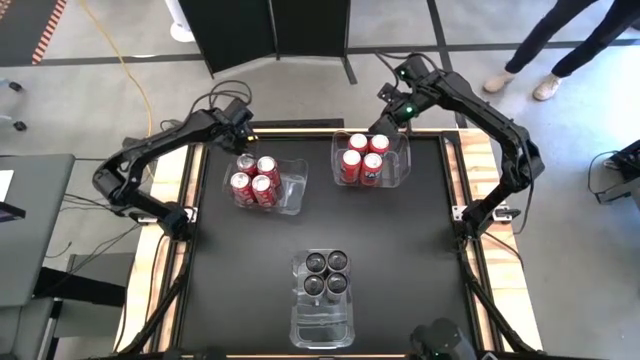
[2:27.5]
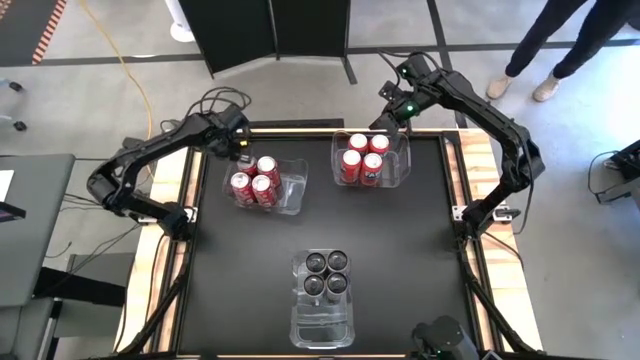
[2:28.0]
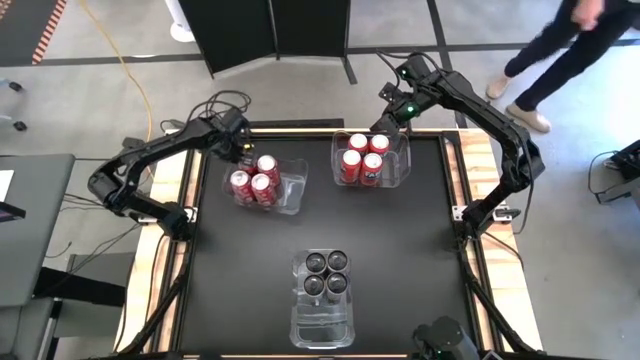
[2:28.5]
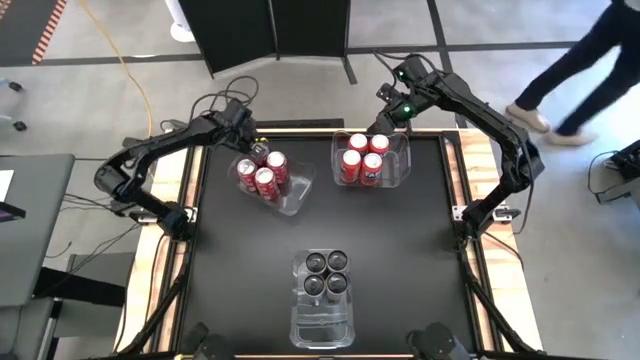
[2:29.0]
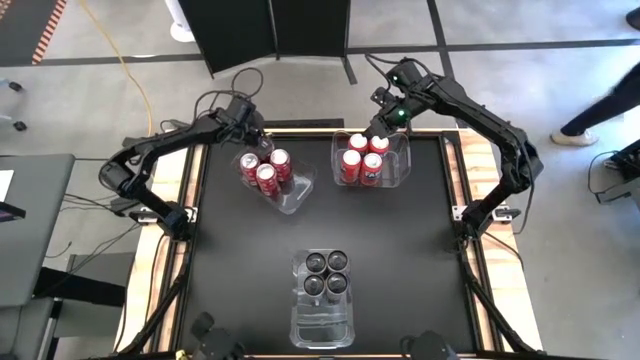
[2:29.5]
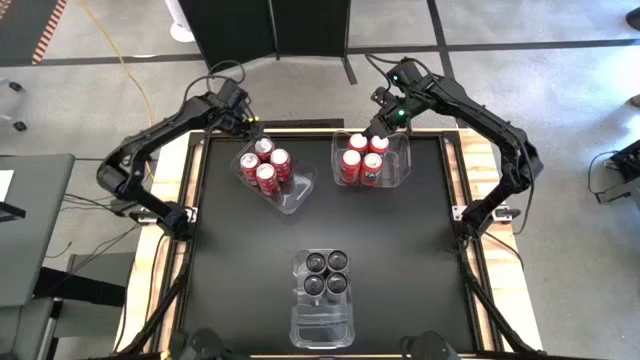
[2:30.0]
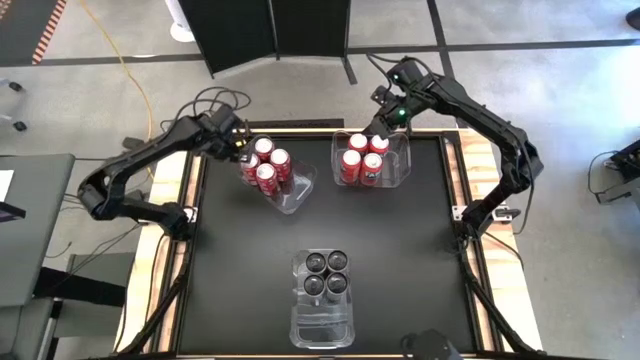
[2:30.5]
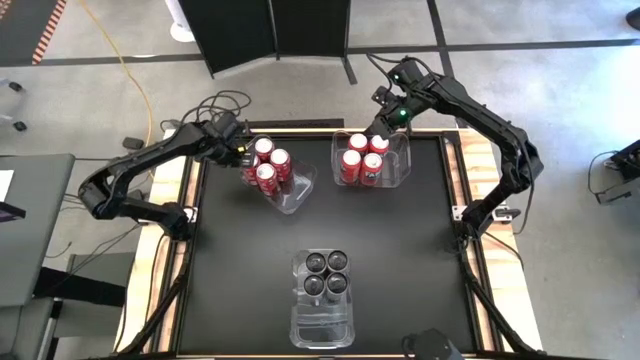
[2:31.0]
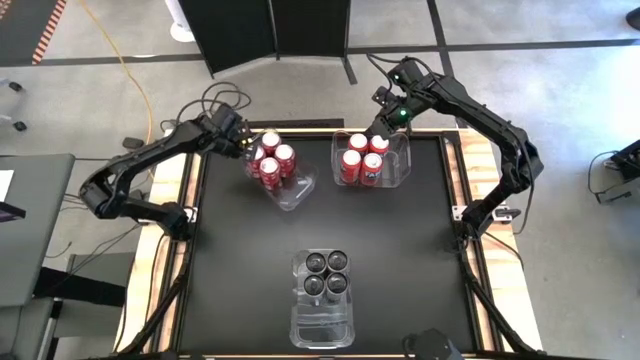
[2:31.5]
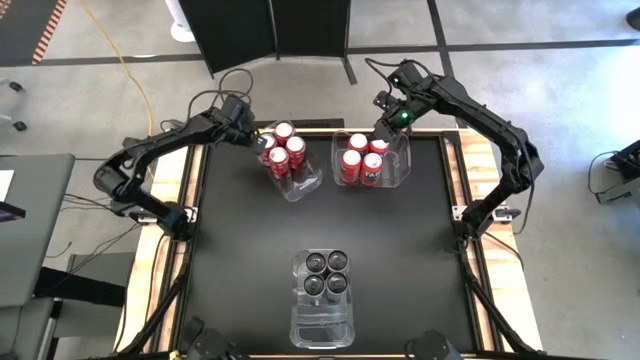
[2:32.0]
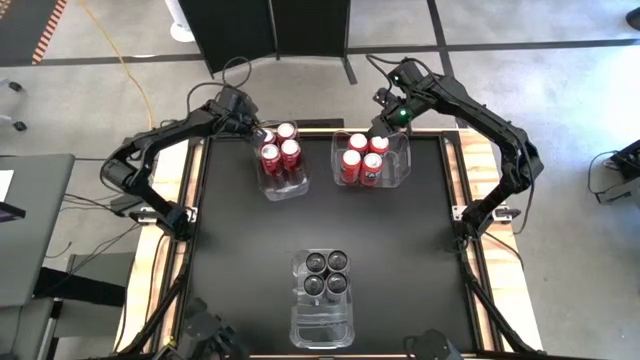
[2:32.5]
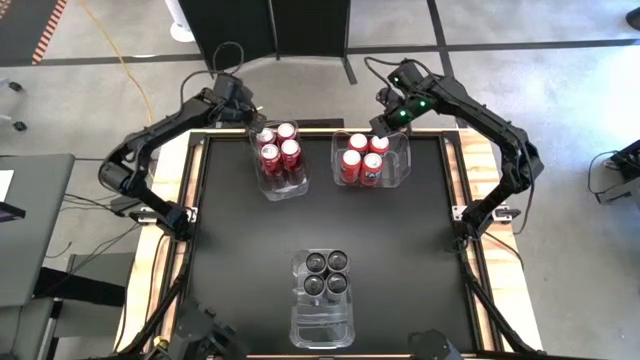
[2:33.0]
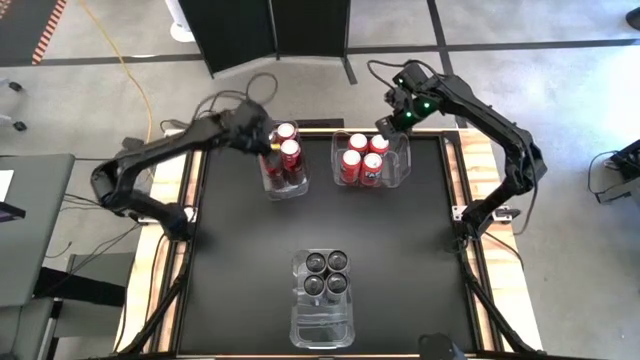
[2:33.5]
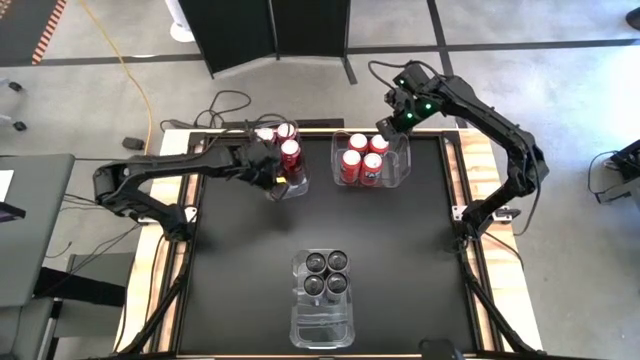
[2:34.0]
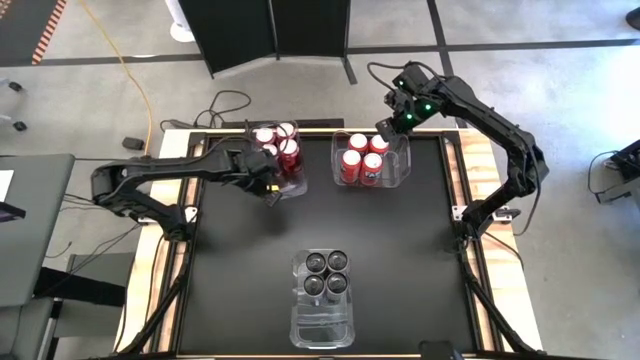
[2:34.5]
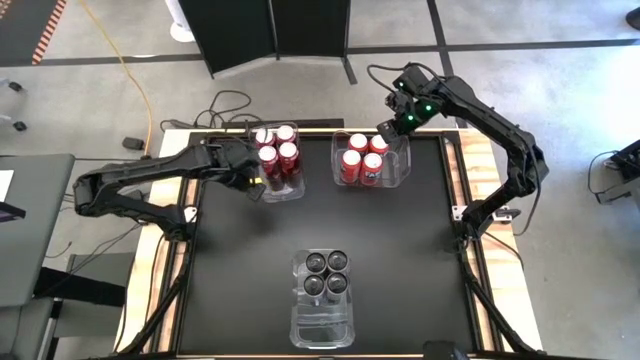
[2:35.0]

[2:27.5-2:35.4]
Task: Sort soda cans
Adjust the left transparent bin

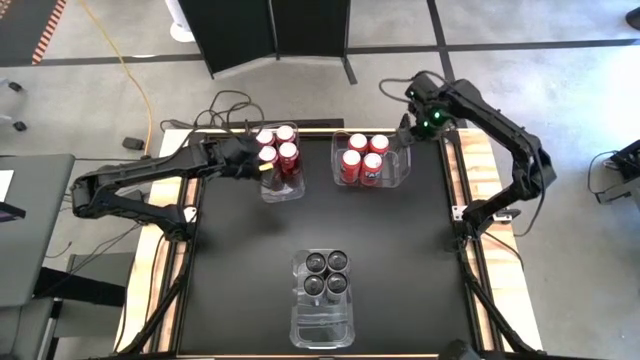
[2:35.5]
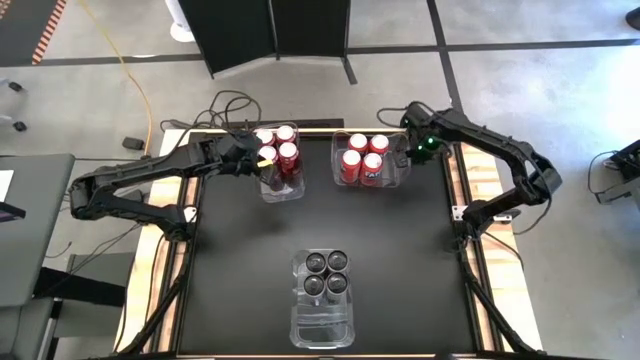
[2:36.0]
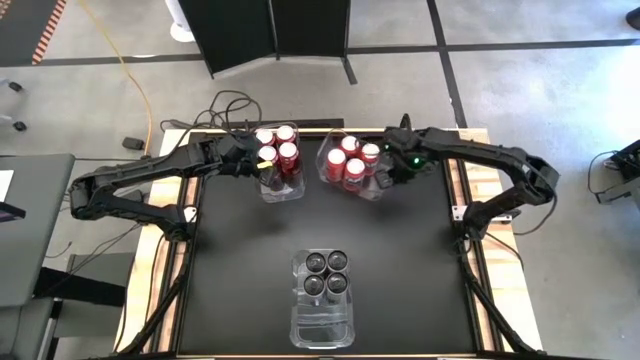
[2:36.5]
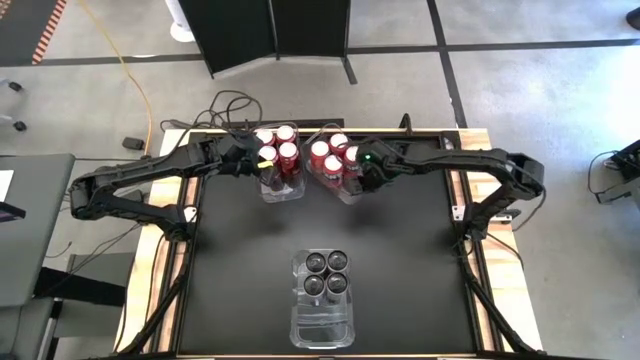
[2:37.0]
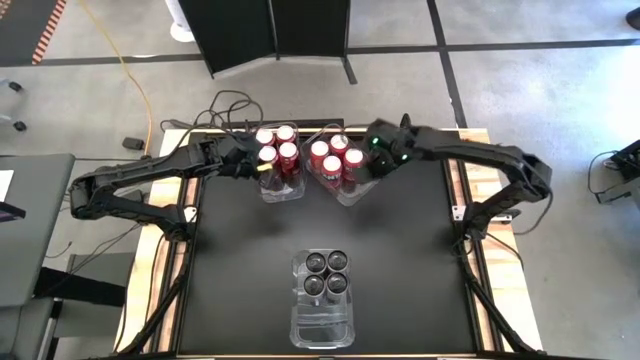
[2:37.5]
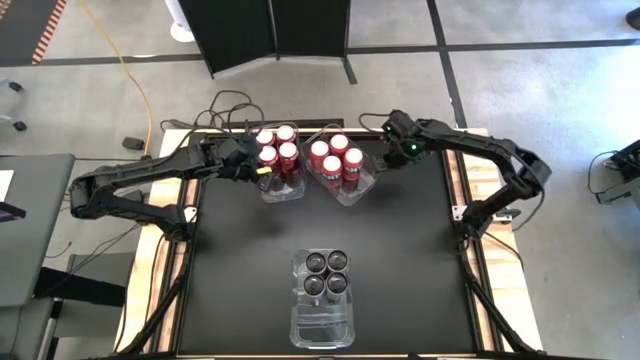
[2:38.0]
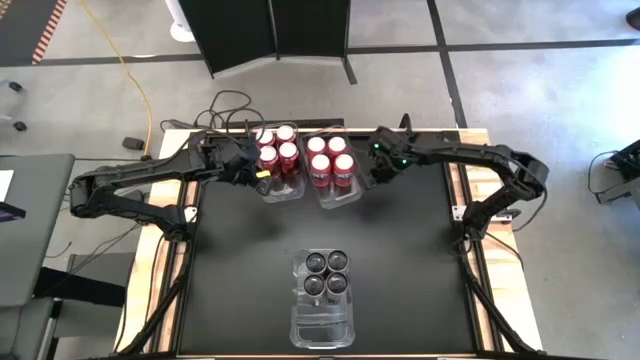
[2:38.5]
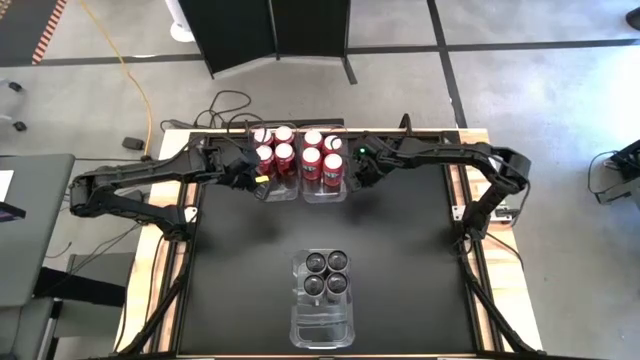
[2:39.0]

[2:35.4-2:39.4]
Adjust the right transparent bin

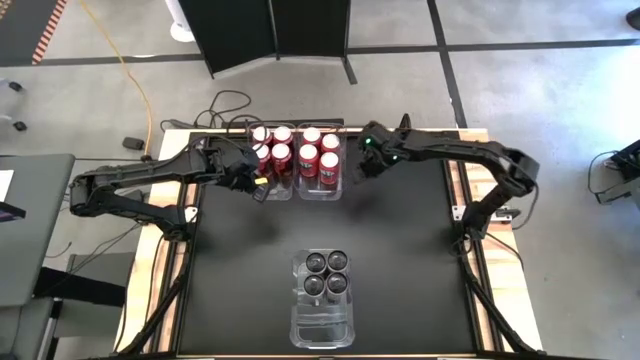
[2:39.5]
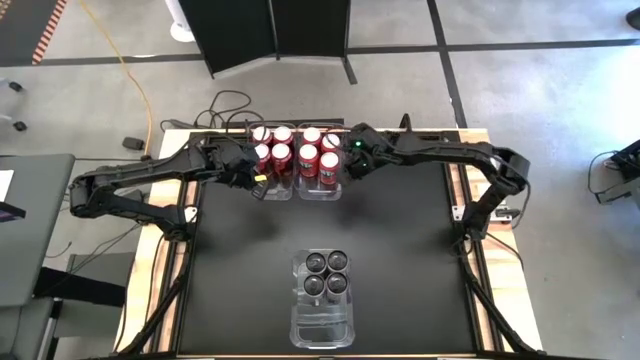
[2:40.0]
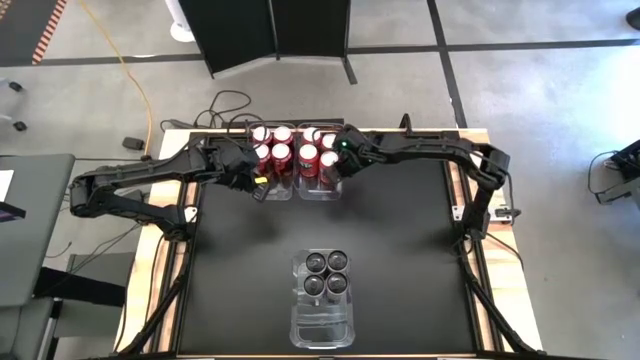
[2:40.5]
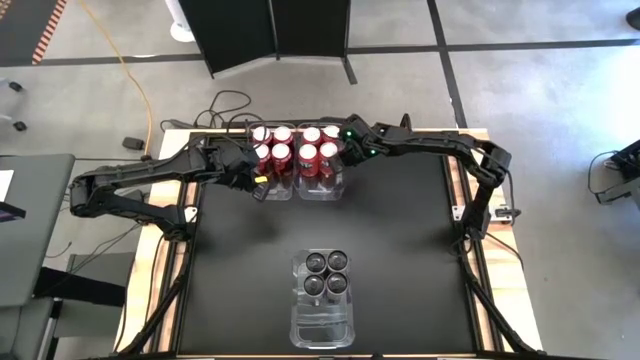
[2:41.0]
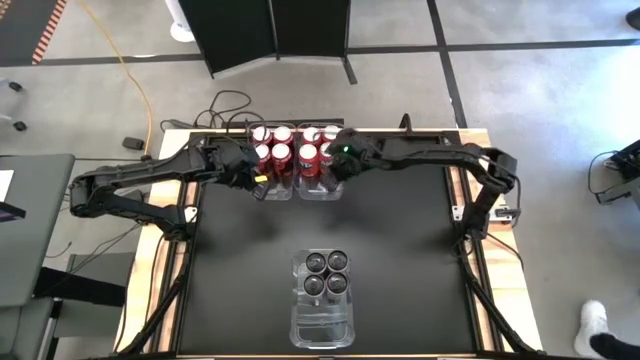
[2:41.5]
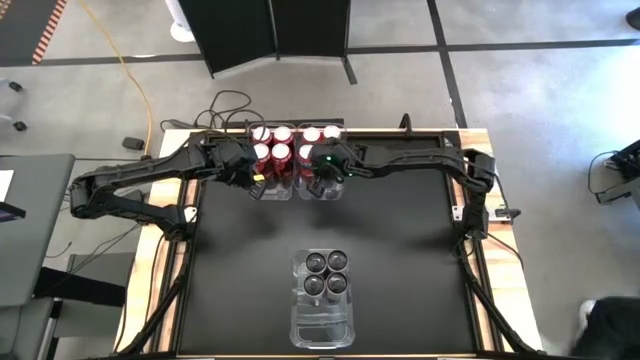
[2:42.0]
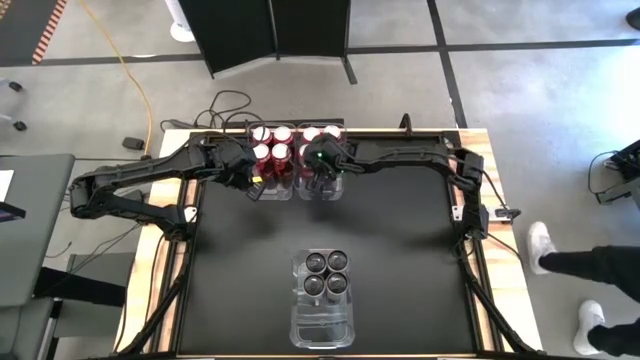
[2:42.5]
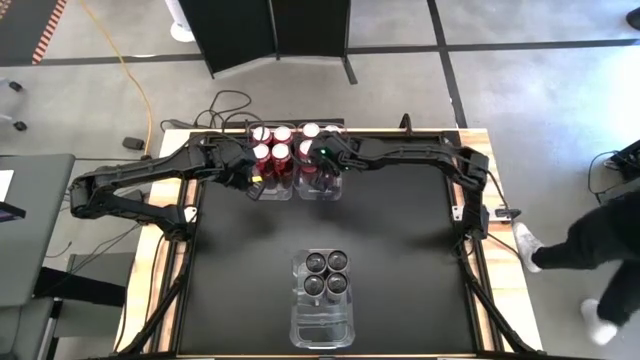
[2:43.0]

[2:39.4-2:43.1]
Adjust the orange soda can on the right transparent bin

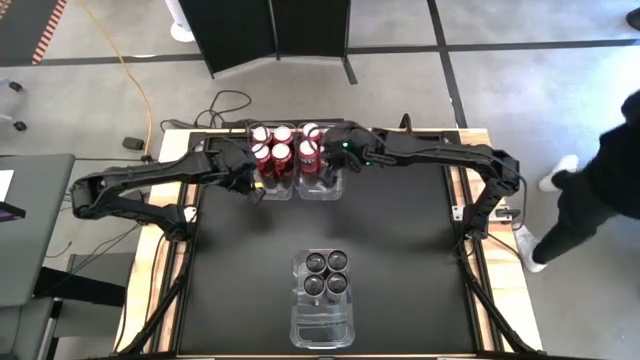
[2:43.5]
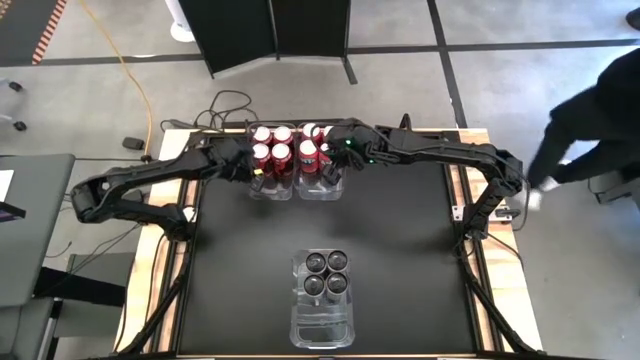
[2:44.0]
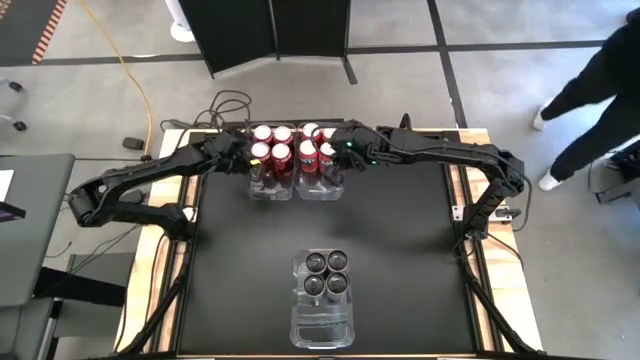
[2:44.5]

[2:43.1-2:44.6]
Adjust the red soda can on the left transparent bin

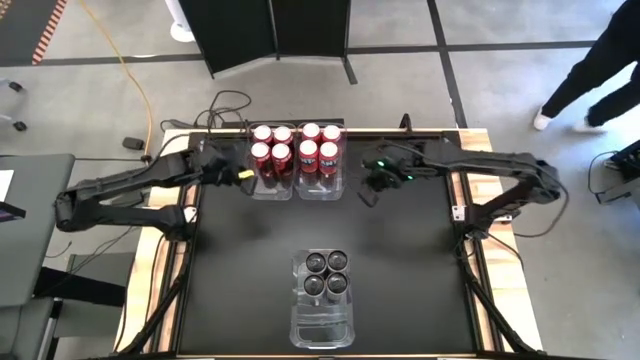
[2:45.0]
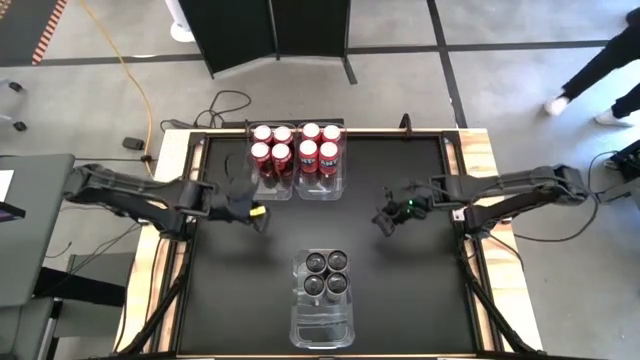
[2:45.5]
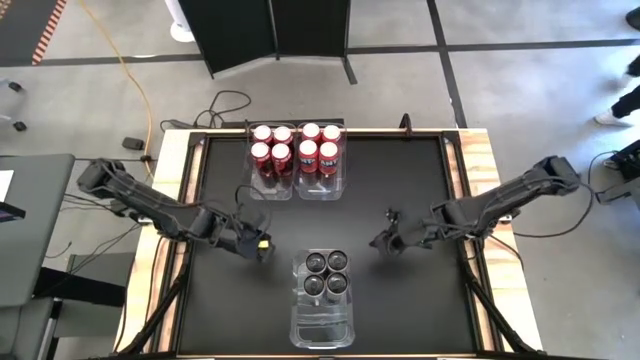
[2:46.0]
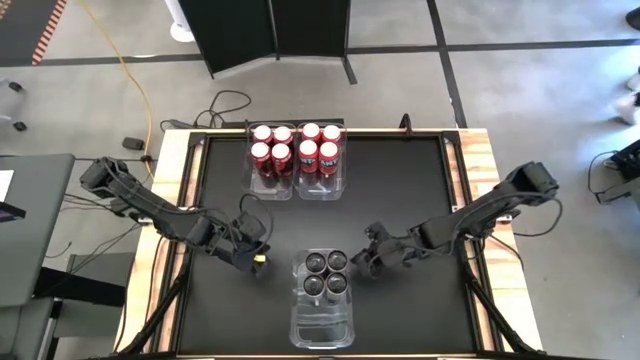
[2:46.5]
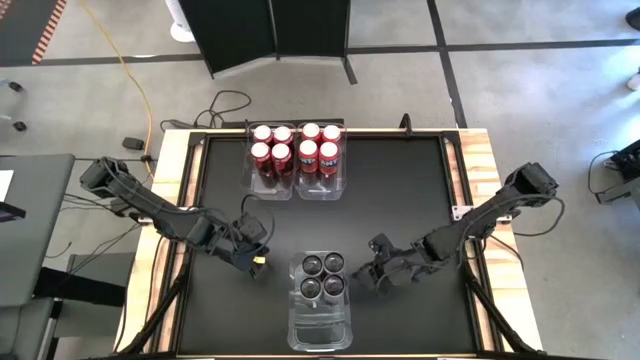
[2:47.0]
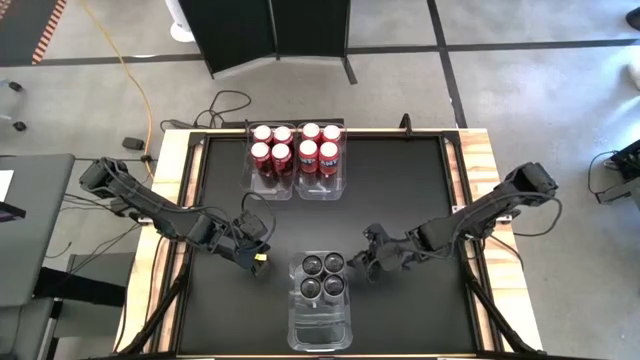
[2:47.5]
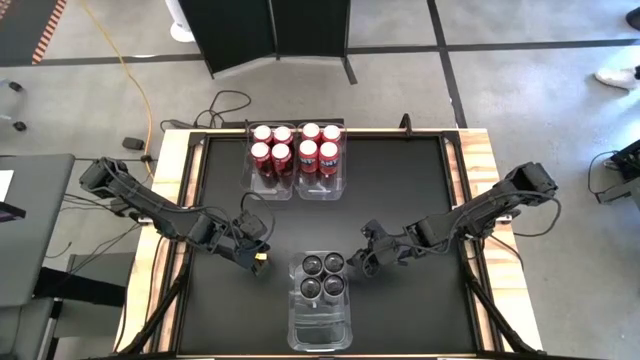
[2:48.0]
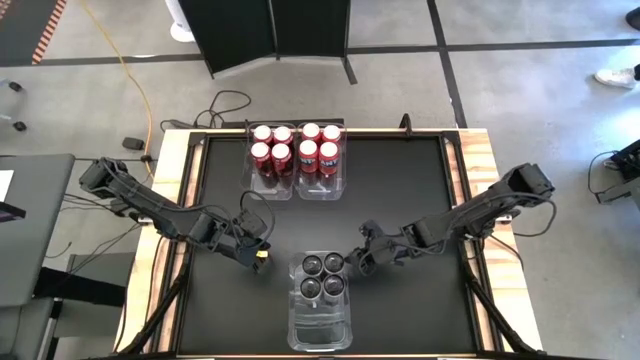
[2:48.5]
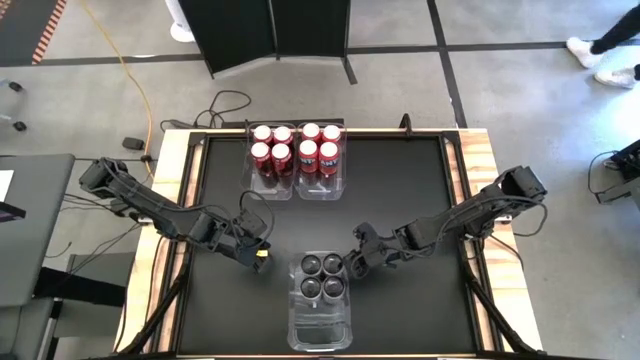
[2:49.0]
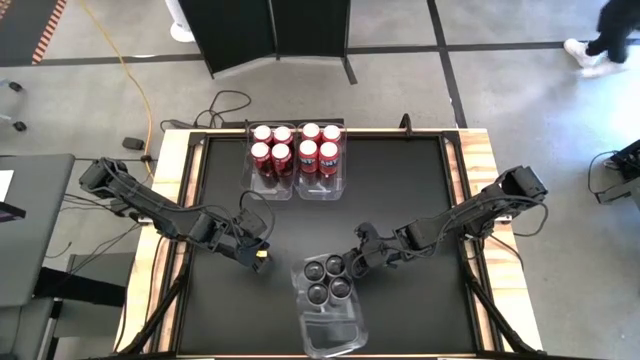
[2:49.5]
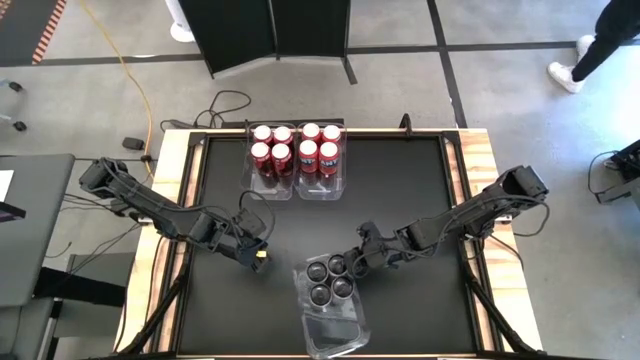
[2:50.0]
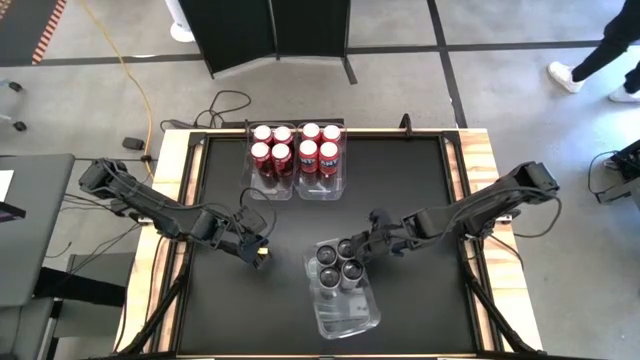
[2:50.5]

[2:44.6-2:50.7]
Move the bottom transparent bin to the top right of the table
